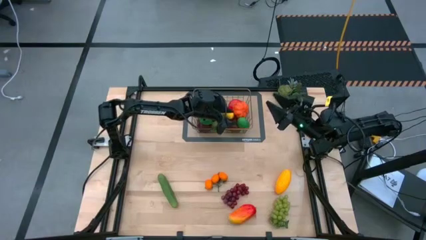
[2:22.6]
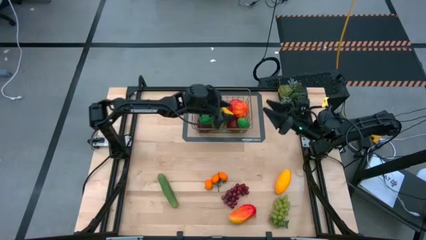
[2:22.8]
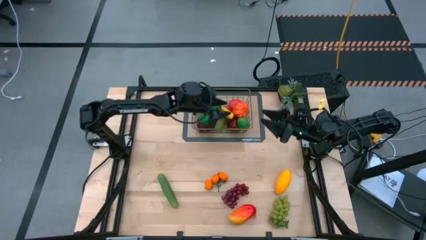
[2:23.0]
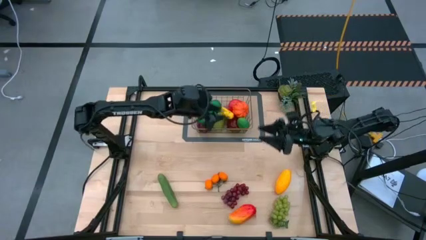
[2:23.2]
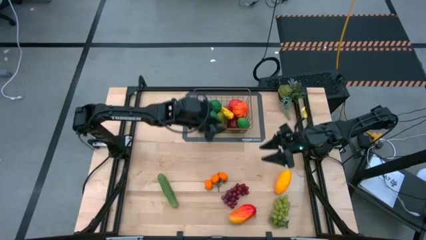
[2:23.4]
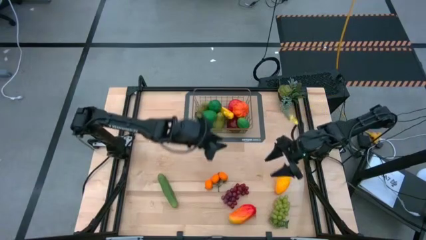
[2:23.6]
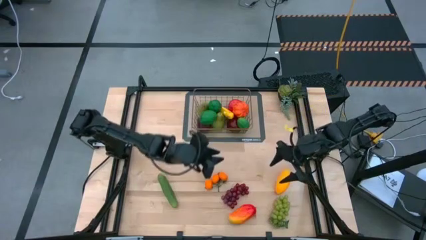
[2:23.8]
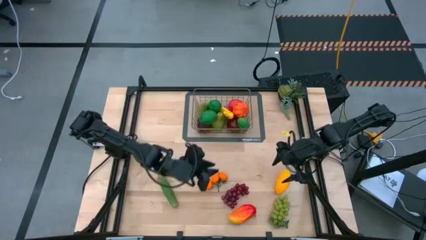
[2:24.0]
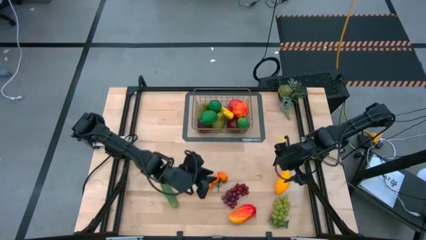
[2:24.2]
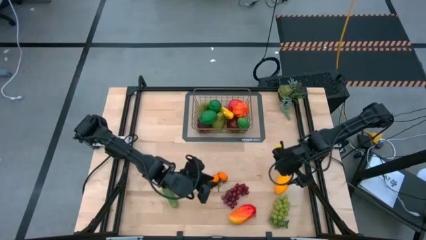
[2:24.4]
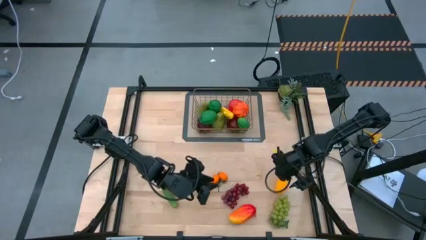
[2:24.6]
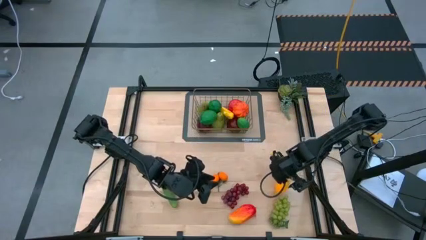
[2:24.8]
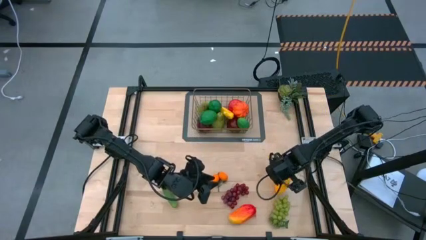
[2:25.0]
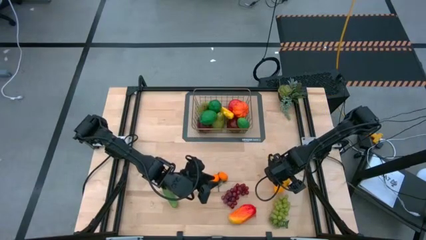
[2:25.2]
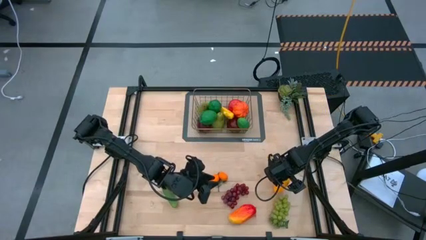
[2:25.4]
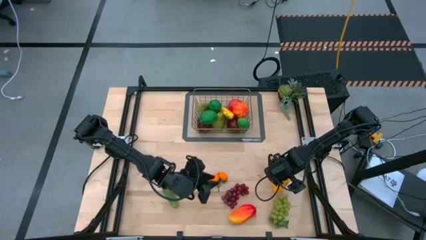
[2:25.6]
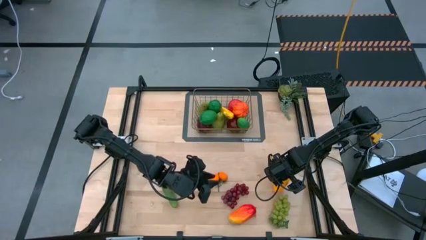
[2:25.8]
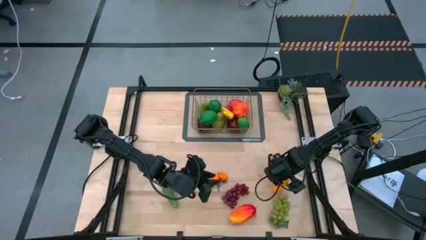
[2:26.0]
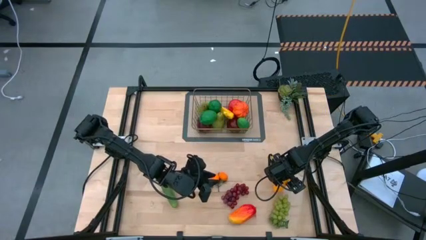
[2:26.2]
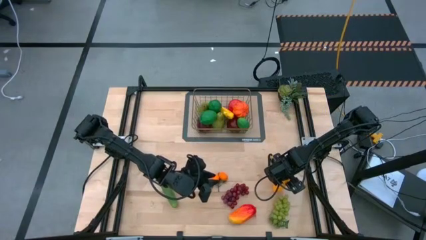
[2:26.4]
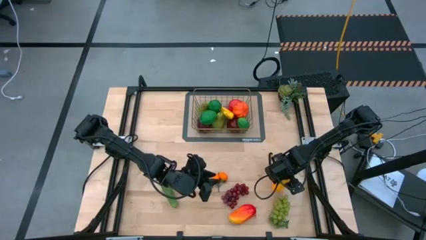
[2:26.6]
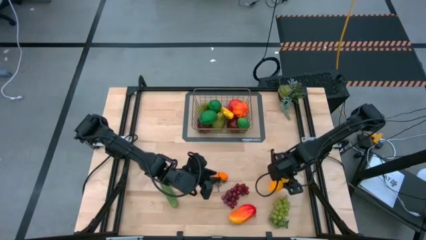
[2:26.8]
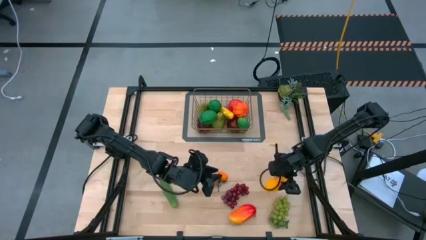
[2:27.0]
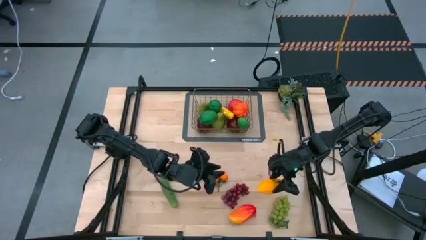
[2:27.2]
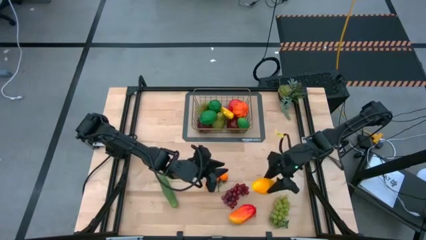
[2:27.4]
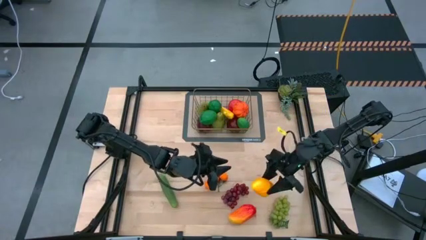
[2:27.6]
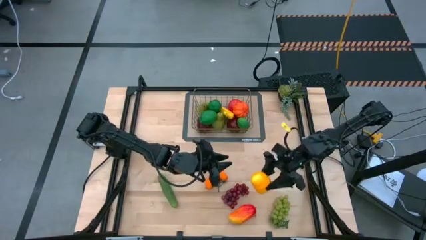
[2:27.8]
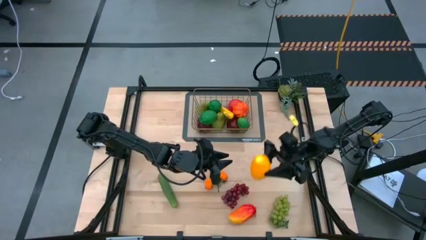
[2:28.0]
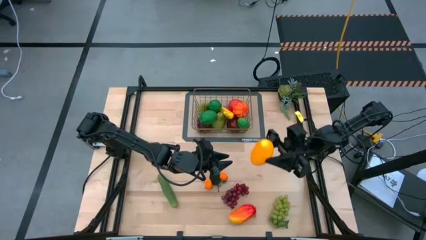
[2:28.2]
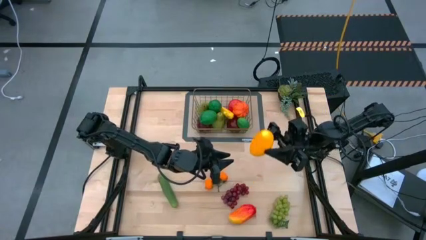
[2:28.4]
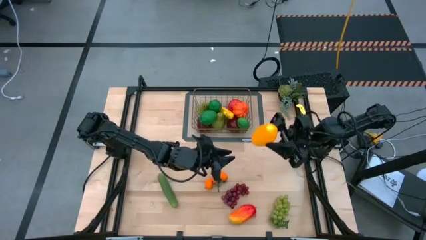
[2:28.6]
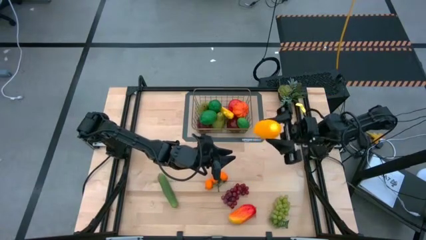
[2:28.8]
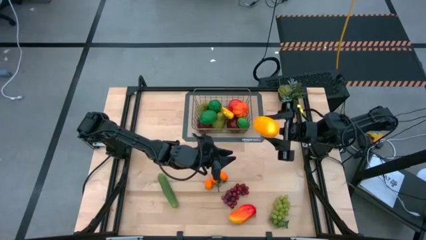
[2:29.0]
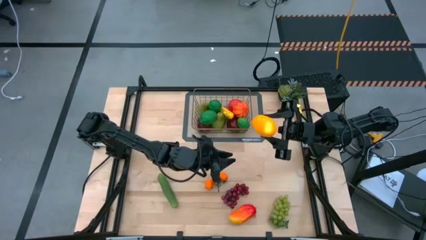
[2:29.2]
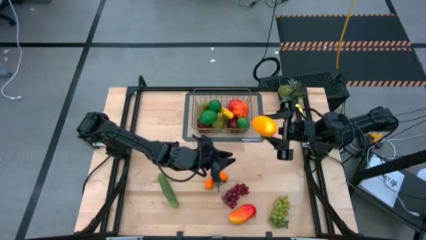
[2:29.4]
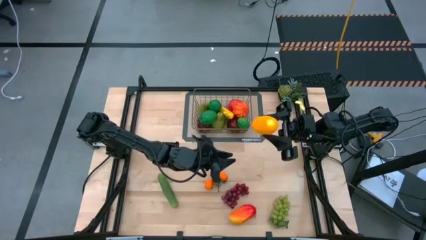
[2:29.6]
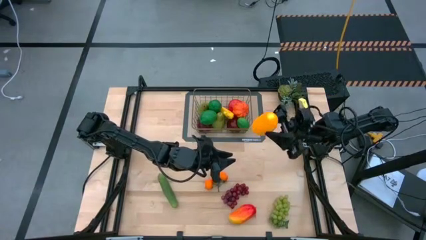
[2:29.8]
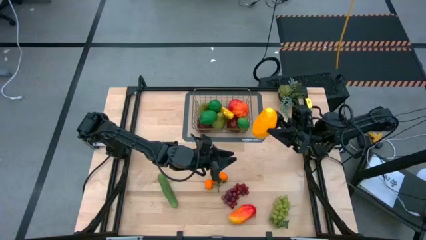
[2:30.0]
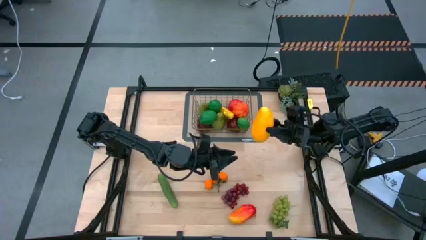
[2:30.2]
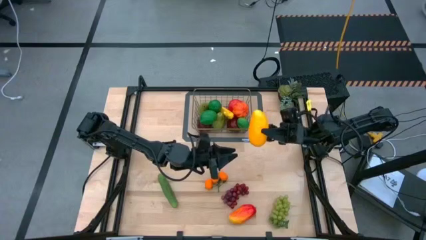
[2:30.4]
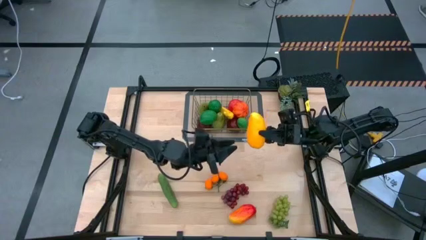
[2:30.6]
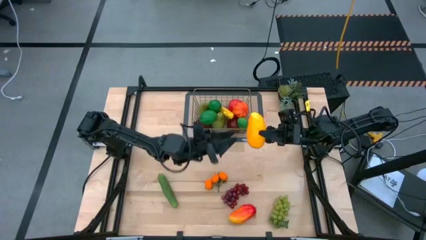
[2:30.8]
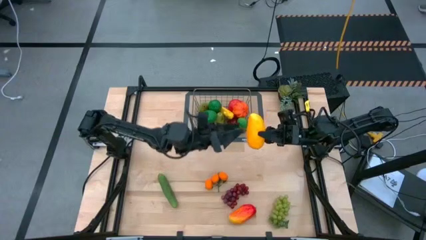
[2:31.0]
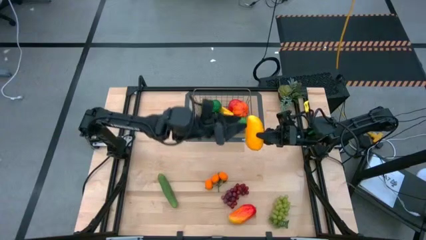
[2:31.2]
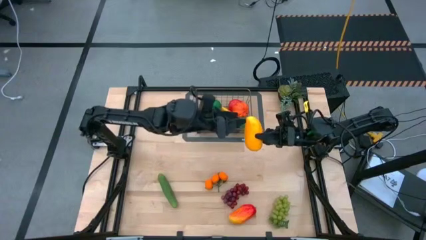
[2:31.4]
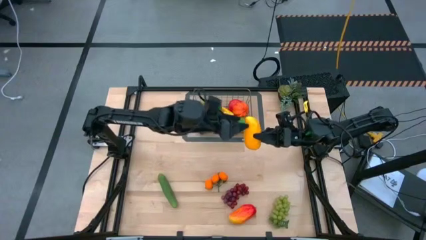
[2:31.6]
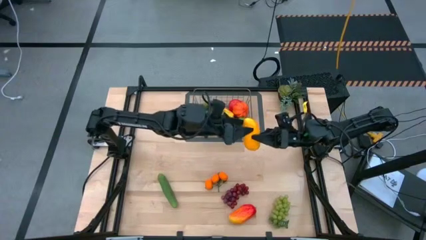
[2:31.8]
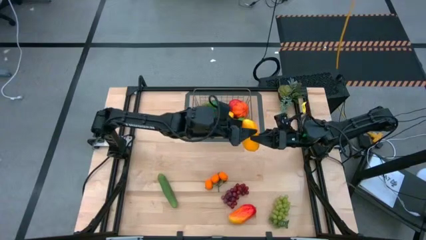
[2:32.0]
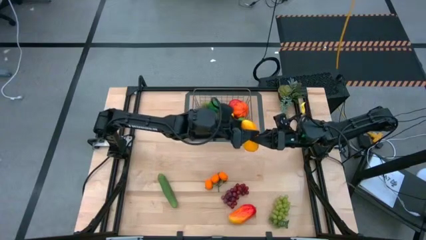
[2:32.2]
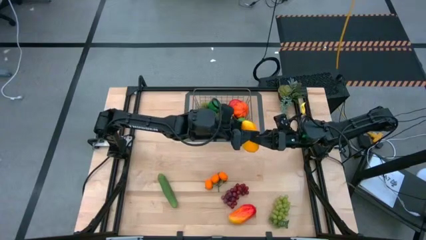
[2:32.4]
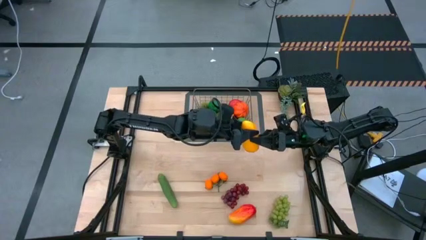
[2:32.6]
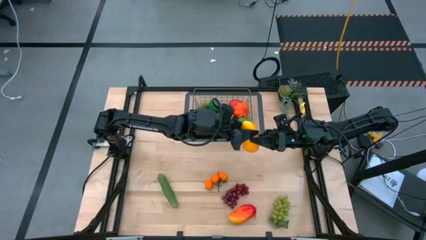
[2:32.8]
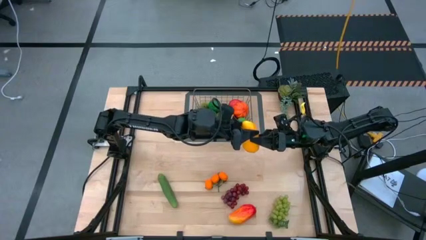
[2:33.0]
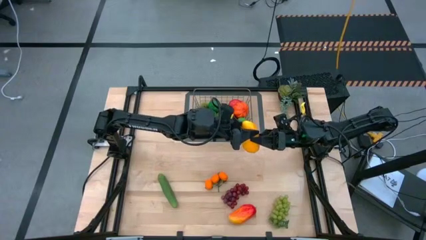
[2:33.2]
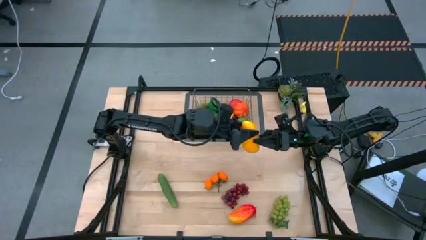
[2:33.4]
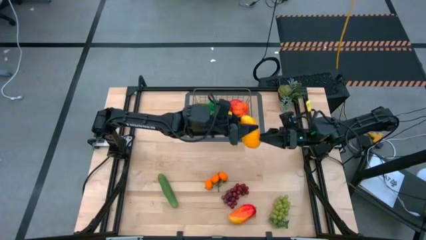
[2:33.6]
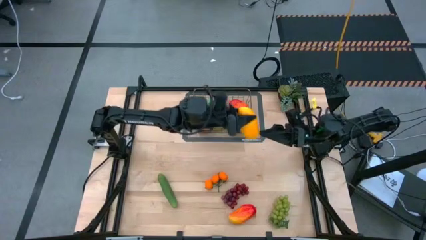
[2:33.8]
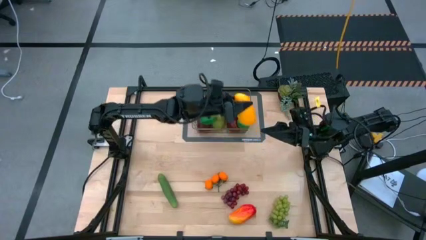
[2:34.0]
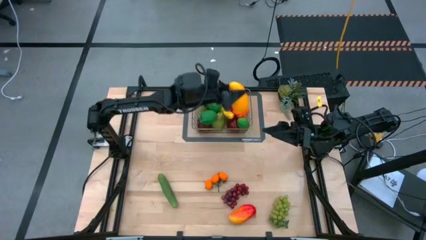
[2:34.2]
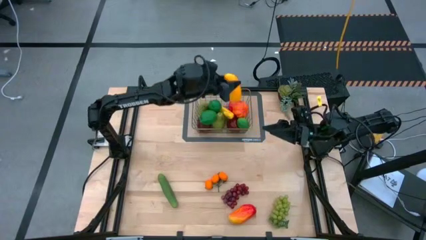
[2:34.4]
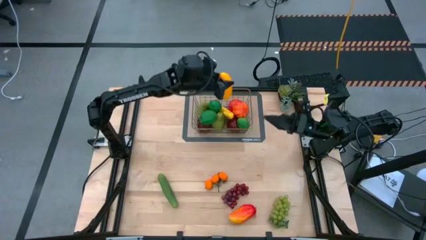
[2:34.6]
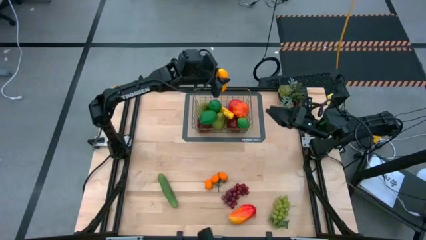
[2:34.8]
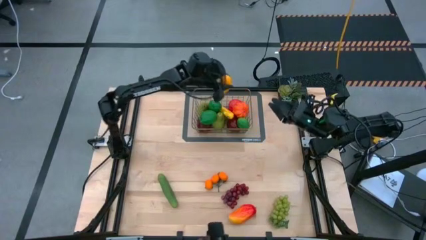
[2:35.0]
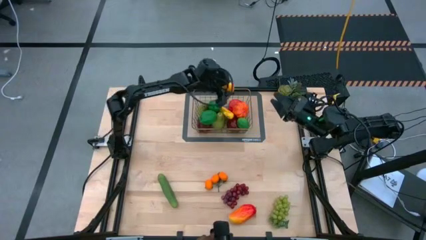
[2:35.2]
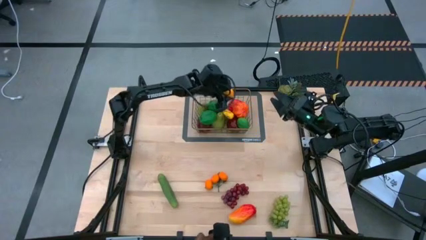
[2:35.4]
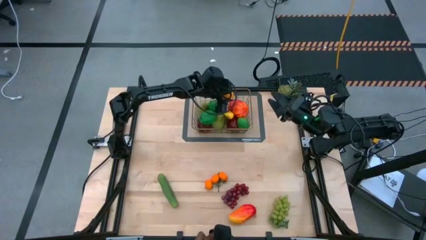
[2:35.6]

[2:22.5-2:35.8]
Task: Build produce basket
Put the yellow mango into the brown wire basket

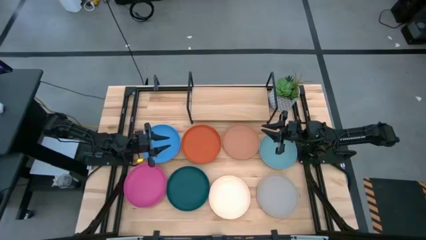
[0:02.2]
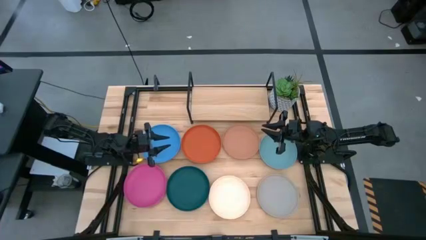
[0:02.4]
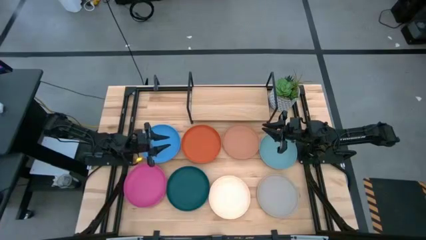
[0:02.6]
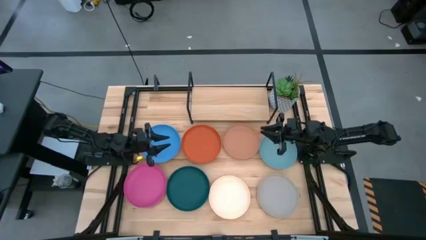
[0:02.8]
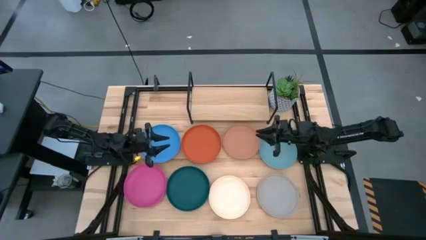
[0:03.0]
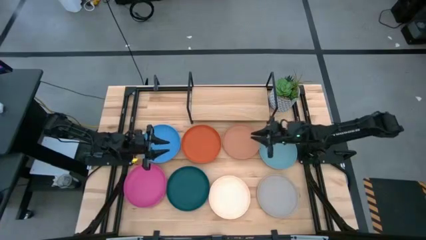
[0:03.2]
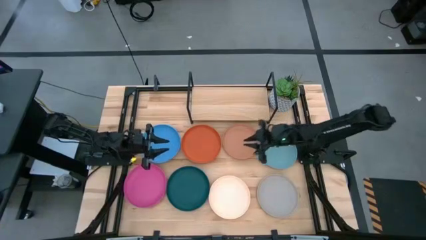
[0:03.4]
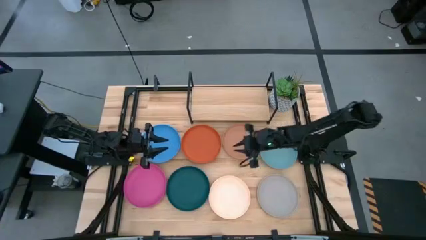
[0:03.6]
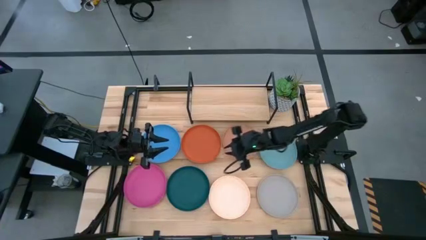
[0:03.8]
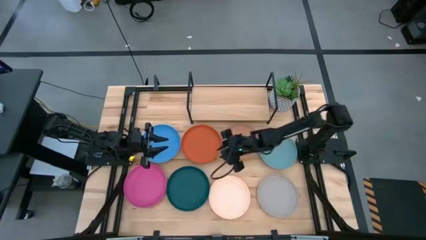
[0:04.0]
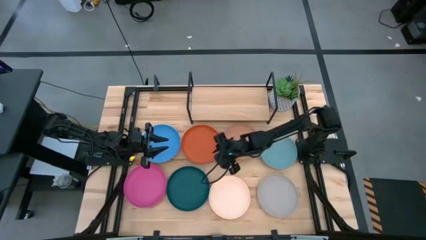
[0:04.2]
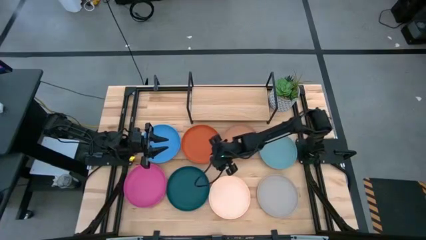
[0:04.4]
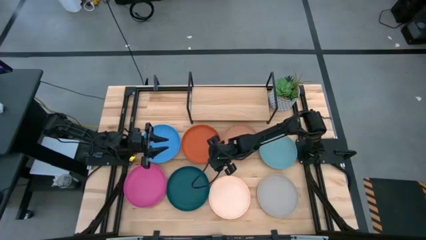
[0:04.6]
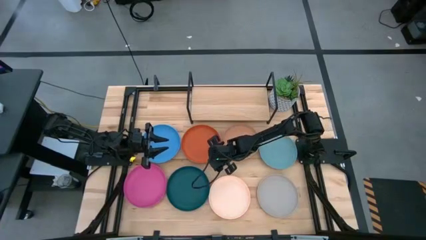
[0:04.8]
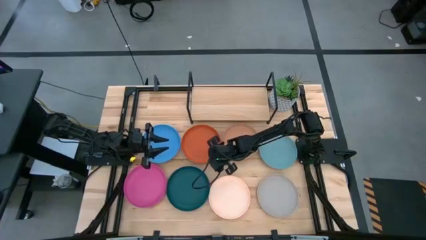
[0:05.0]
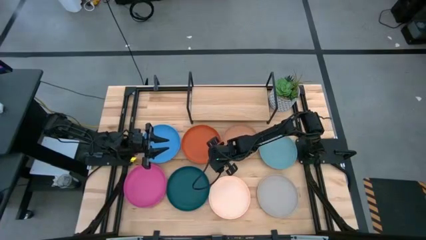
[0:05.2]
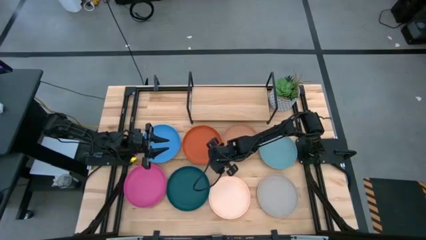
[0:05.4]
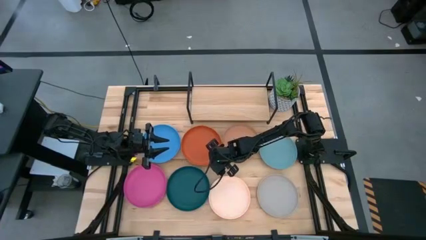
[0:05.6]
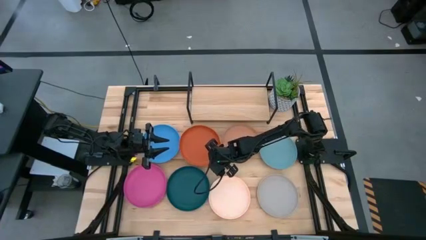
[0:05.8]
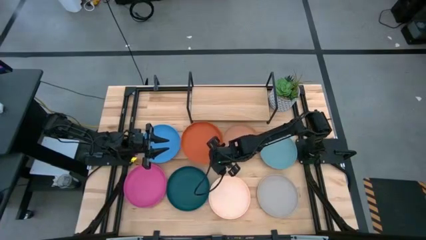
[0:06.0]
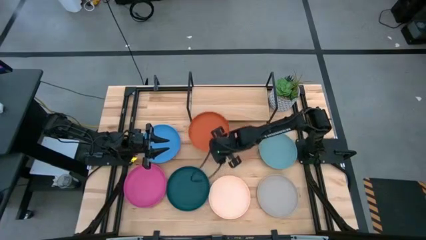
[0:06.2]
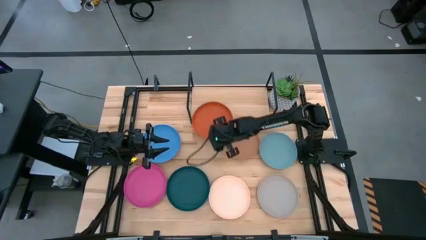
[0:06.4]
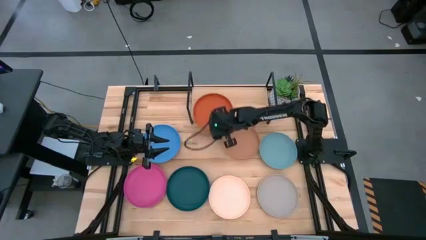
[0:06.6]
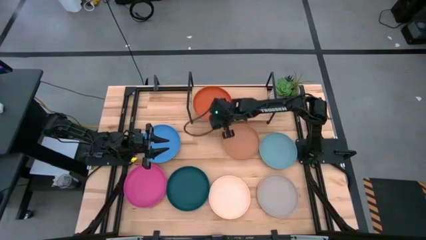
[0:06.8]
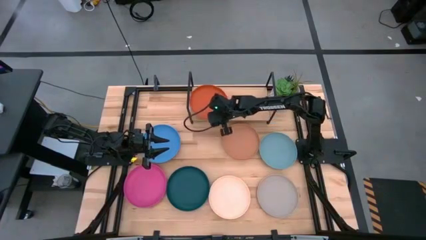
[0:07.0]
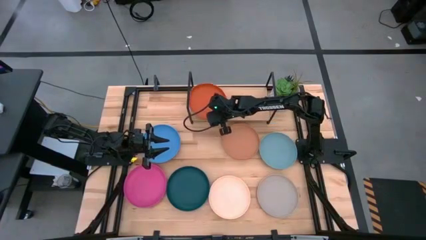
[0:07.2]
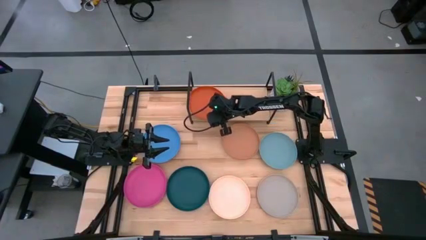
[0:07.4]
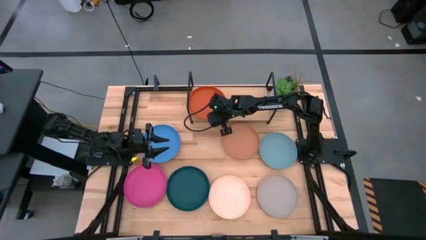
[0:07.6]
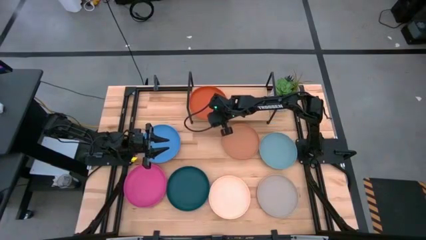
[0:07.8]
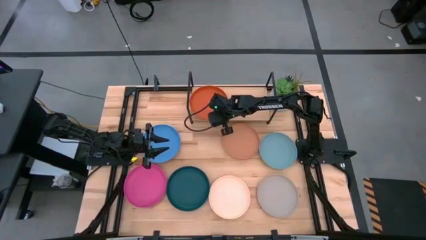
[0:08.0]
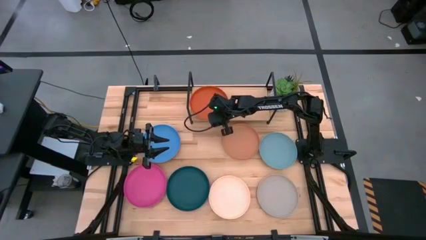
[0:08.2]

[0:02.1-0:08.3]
Task: Place and stack plates onto a shelf
Put the orange plate on the shelf
